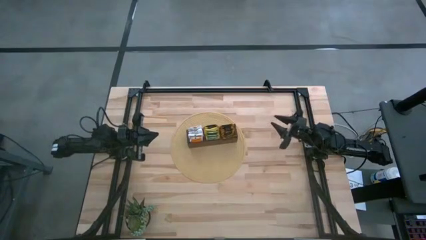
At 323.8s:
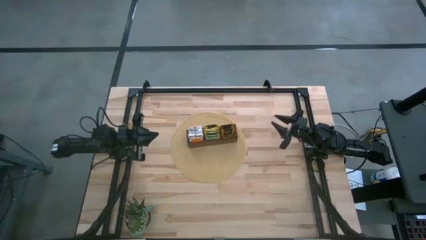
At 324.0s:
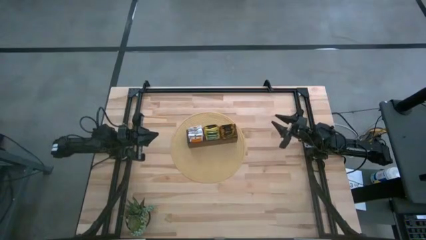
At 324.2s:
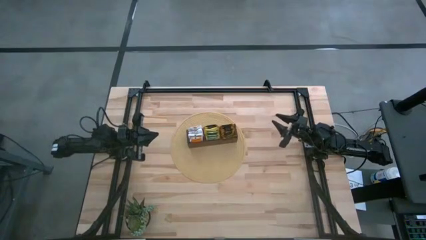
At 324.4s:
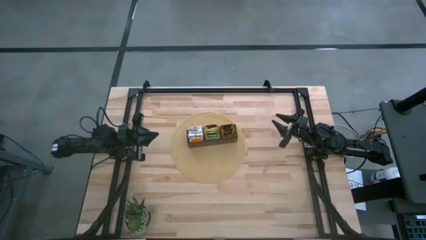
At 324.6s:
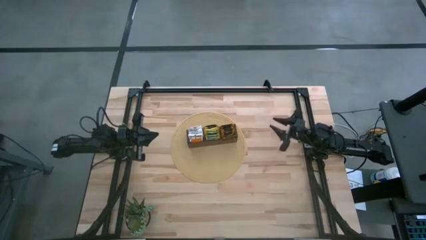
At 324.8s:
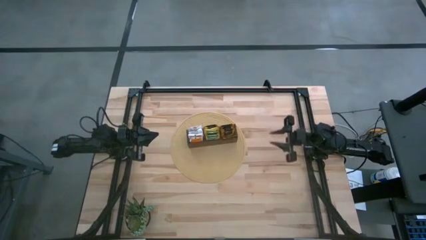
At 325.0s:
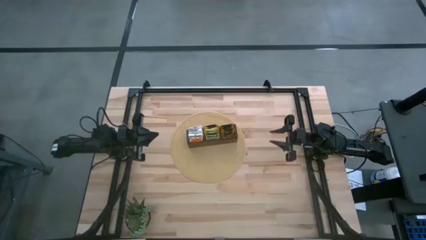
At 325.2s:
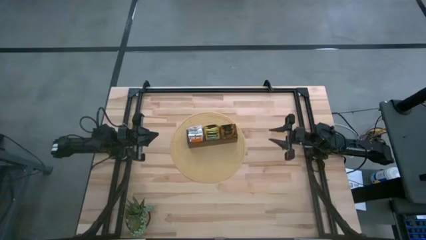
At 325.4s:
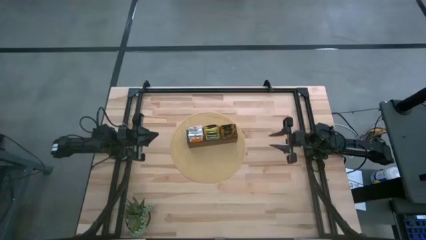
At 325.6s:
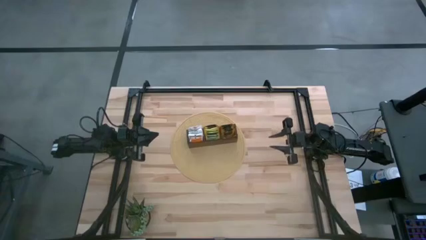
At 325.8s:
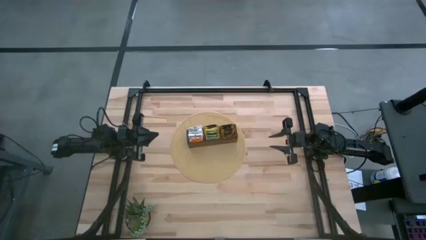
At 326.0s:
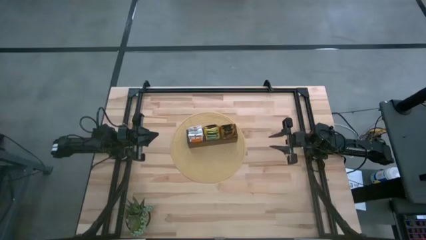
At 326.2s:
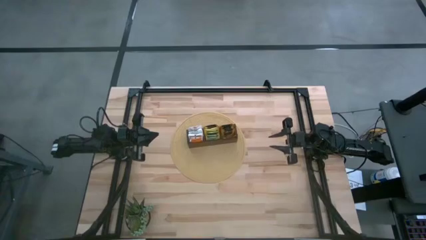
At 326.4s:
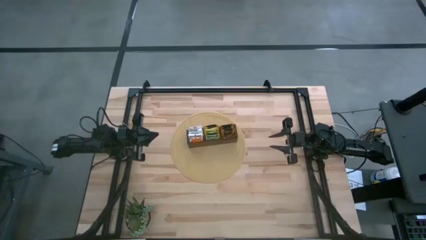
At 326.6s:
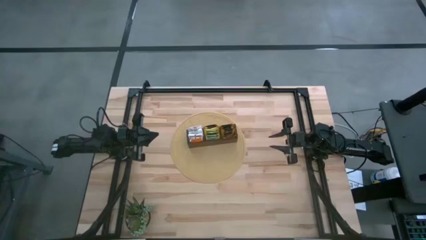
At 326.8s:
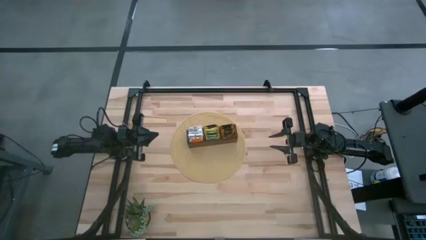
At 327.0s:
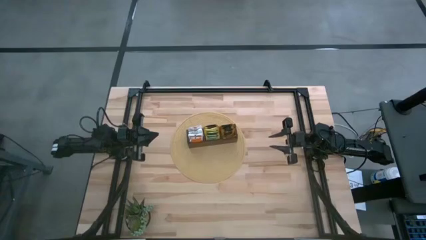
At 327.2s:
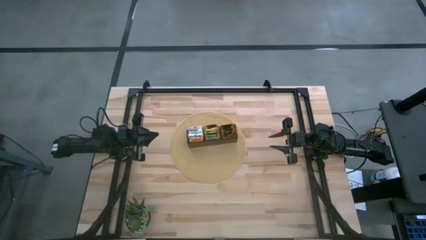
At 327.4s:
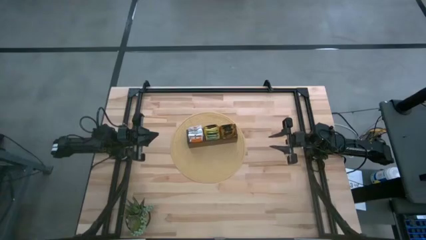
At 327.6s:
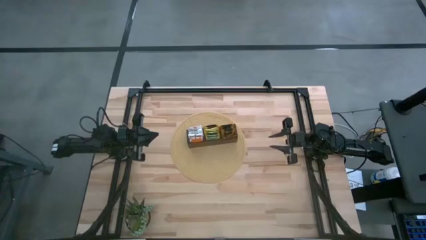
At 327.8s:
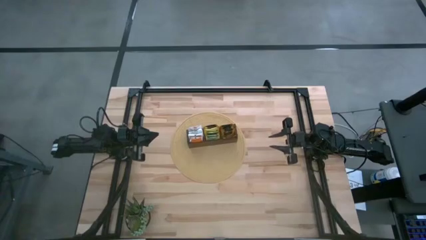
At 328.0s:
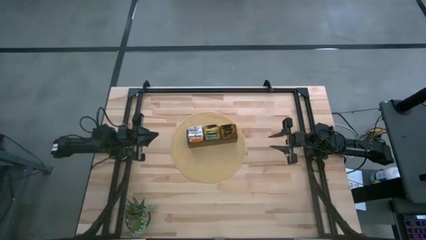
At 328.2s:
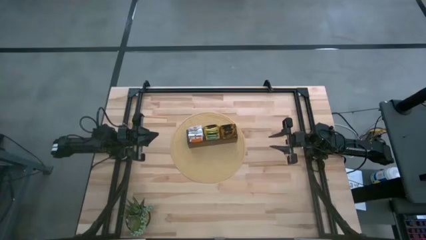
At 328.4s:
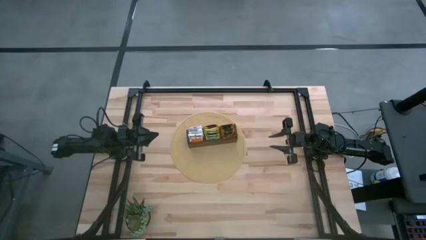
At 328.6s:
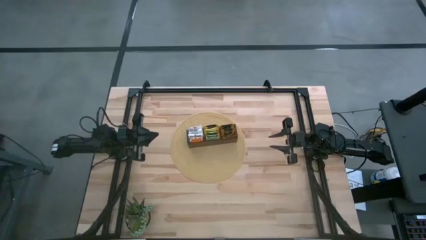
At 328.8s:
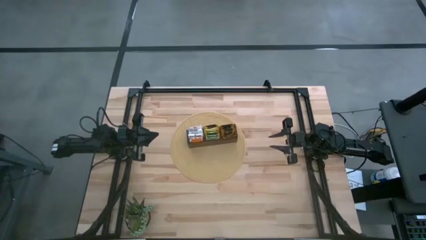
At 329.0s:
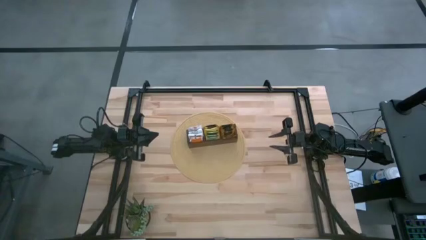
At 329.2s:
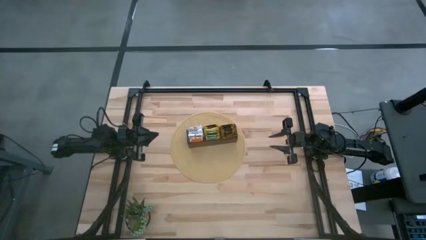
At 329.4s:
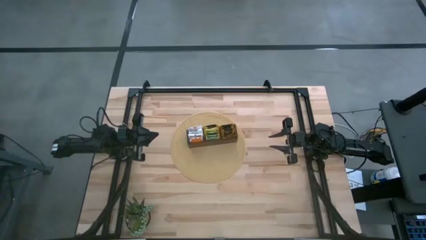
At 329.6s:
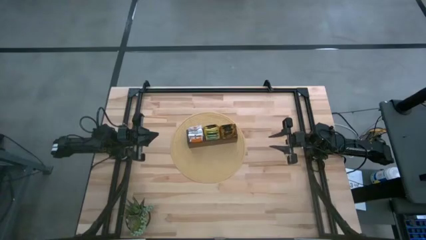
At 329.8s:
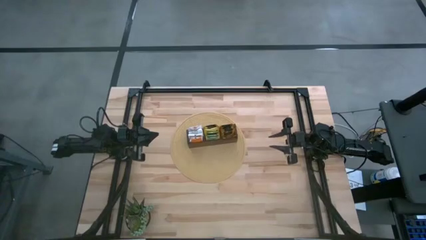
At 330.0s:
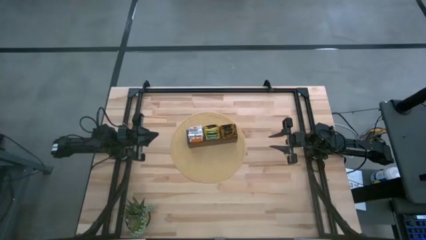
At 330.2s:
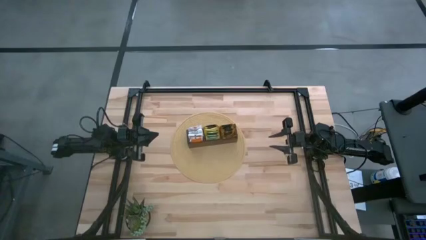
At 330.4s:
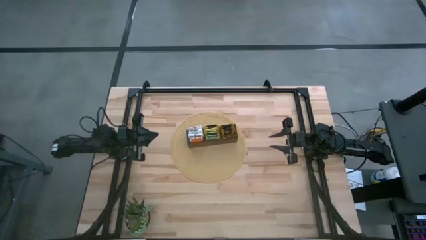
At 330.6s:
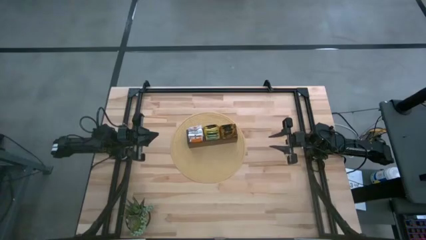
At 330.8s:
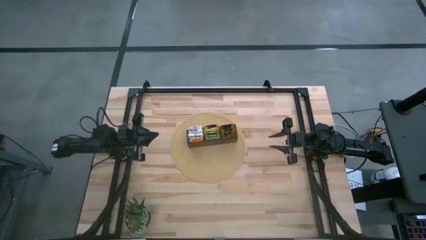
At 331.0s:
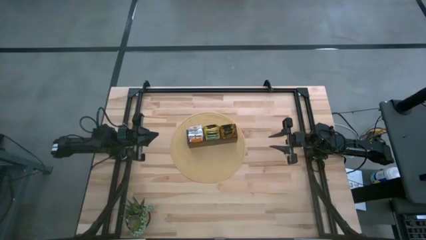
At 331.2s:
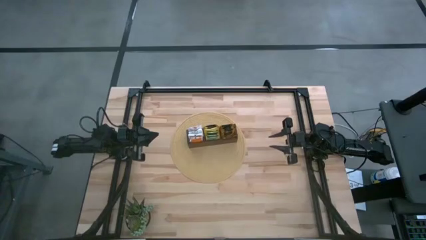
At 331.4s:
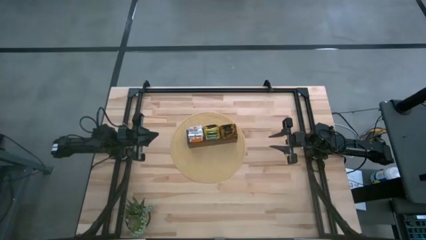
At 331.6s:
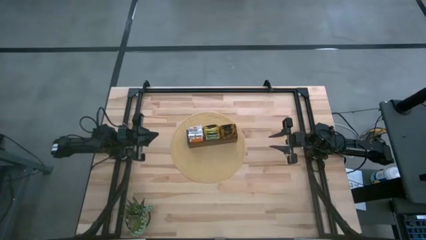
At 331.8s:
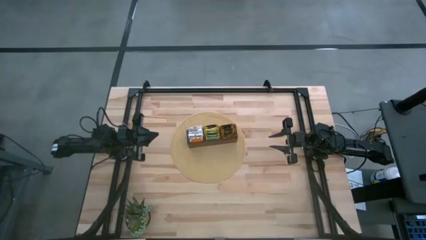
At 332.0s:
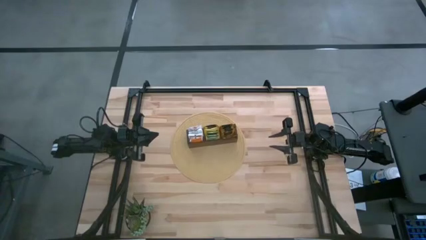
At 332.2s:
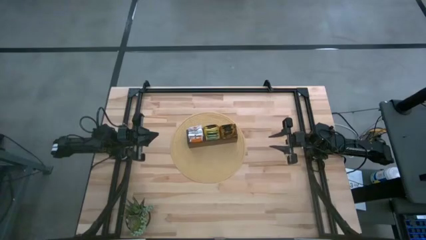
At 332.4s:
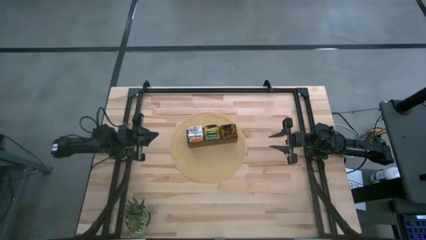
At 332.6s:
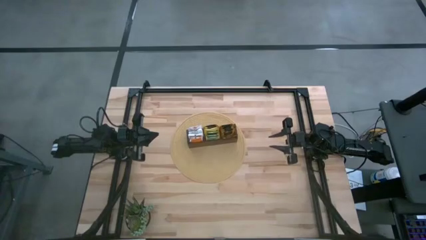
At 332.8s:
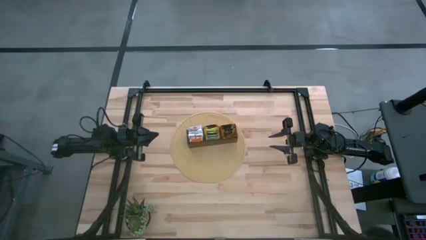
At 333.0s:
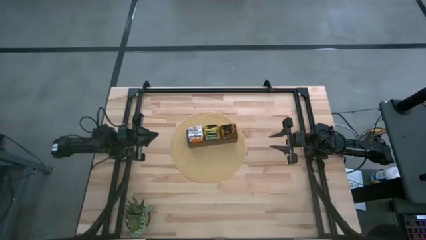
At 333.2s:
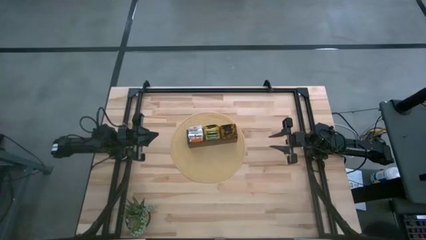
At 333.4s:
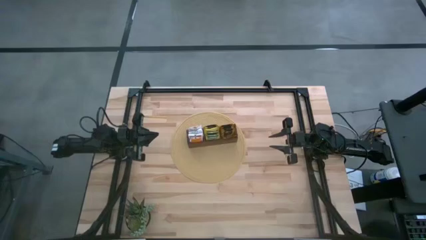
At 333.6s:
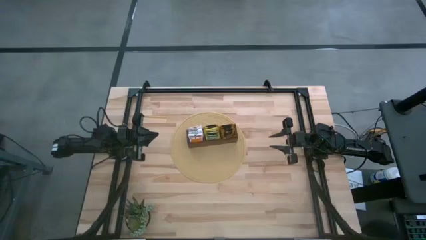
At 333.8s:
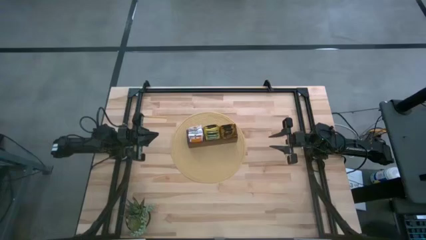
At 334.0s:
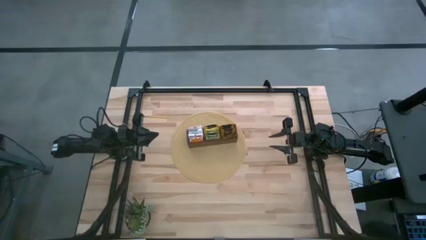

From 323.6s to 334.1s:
Task: Pick & Place Tea
Return to Home Position

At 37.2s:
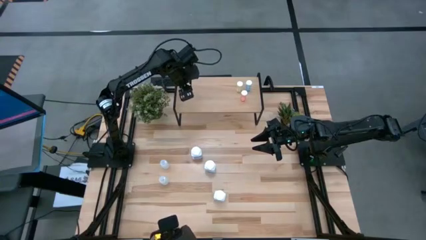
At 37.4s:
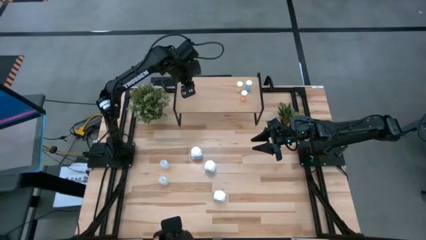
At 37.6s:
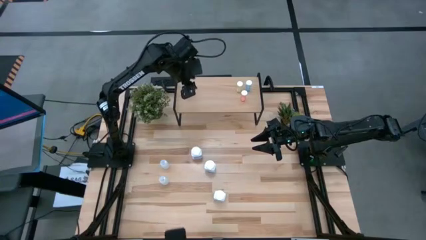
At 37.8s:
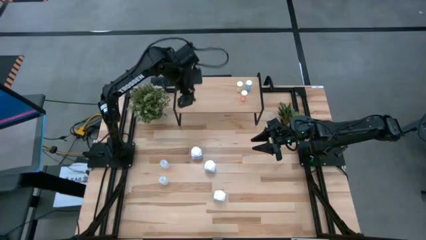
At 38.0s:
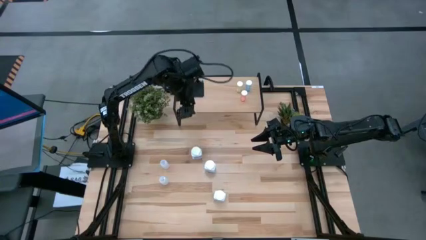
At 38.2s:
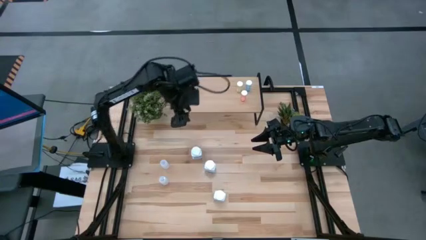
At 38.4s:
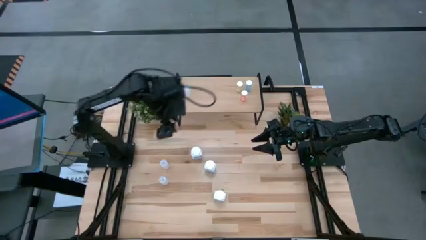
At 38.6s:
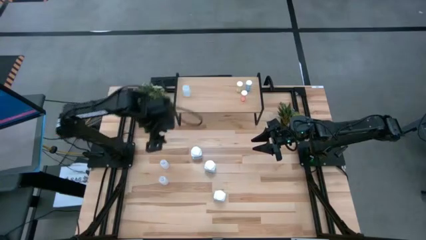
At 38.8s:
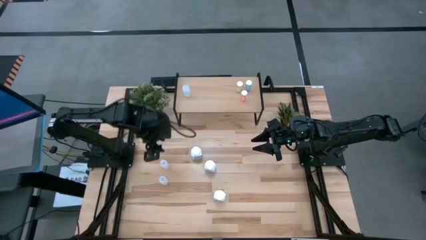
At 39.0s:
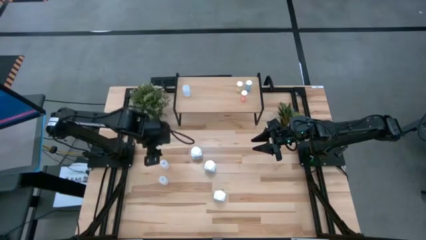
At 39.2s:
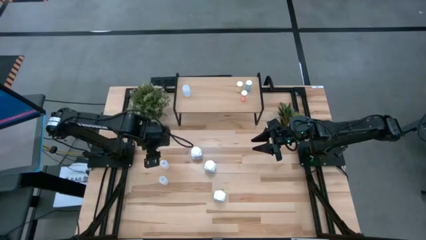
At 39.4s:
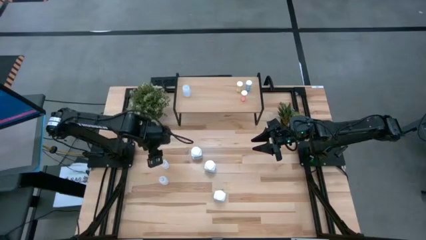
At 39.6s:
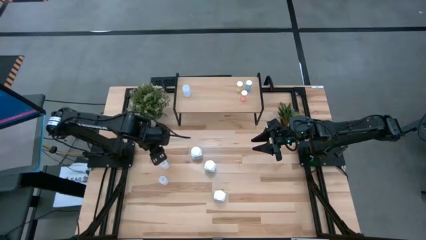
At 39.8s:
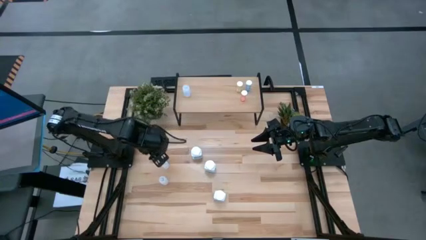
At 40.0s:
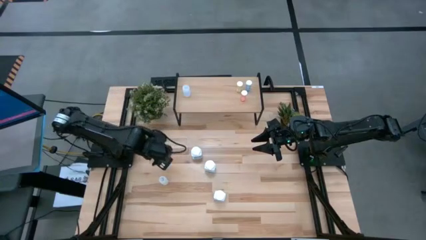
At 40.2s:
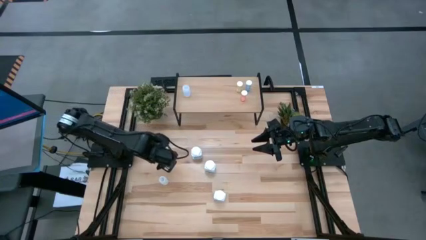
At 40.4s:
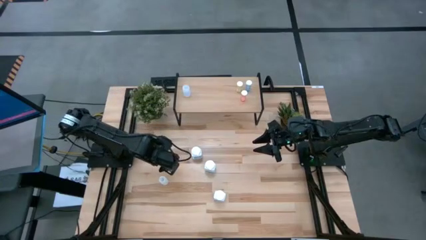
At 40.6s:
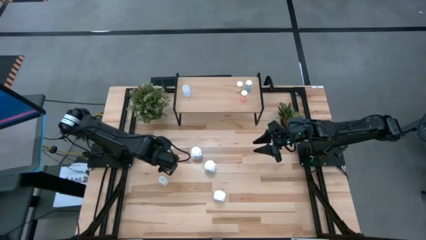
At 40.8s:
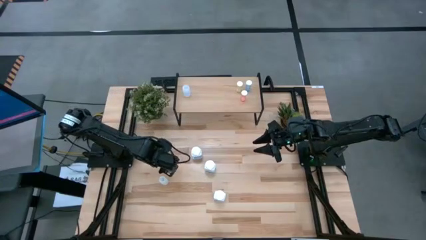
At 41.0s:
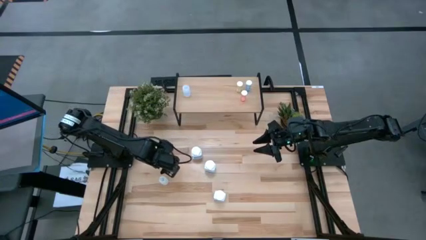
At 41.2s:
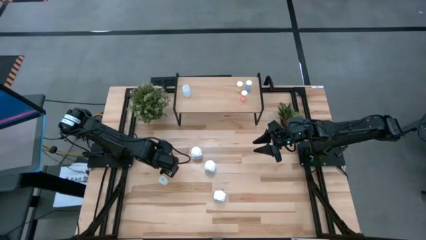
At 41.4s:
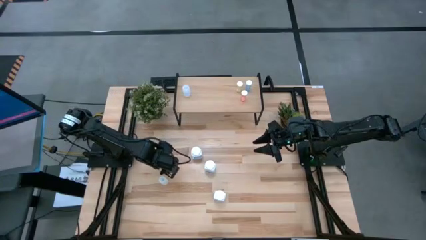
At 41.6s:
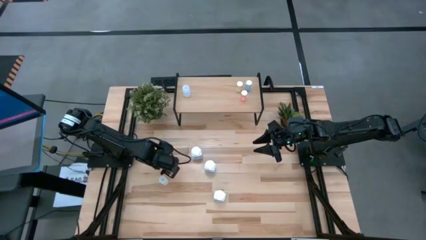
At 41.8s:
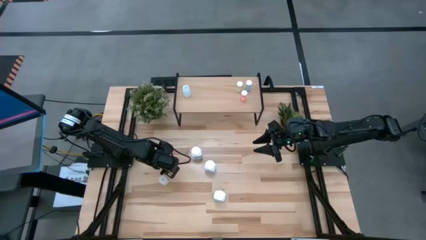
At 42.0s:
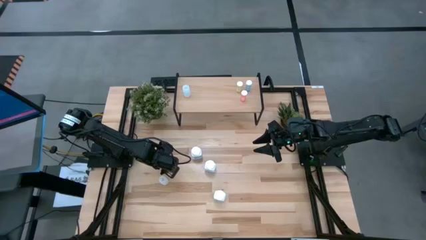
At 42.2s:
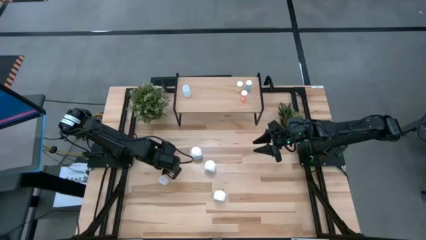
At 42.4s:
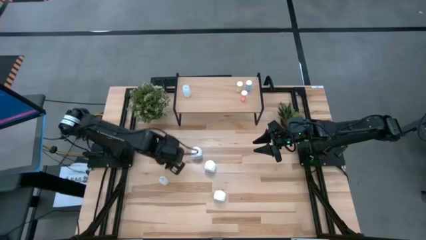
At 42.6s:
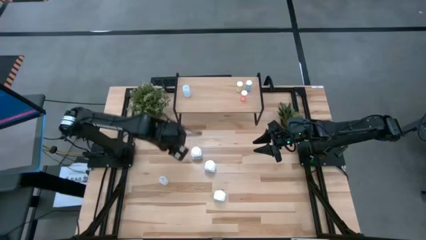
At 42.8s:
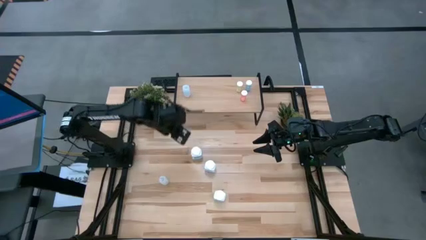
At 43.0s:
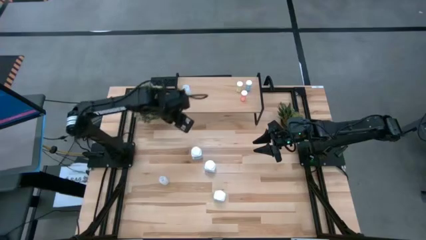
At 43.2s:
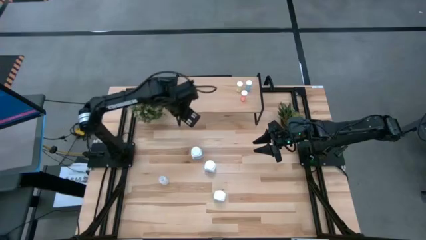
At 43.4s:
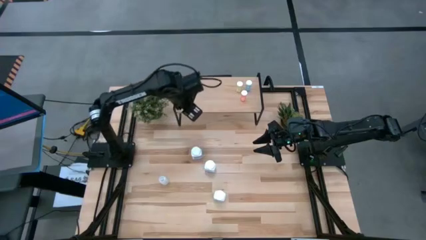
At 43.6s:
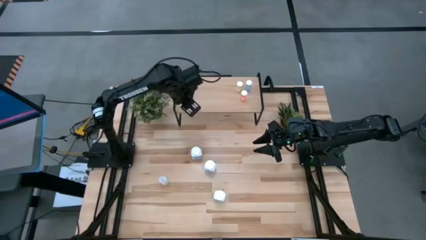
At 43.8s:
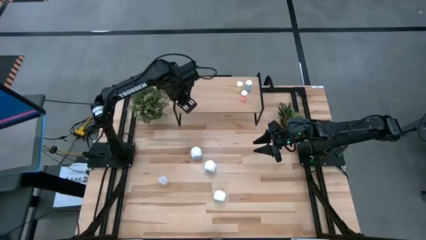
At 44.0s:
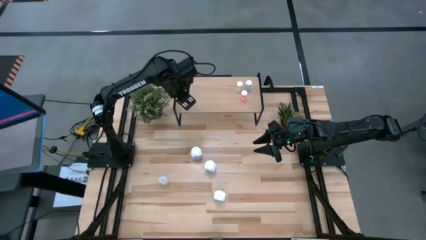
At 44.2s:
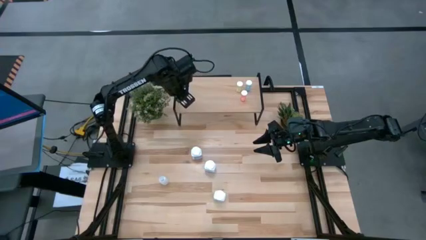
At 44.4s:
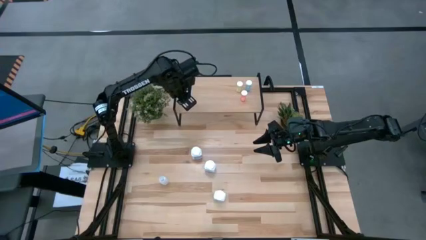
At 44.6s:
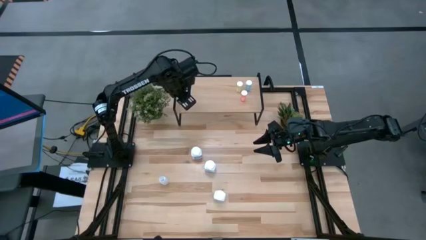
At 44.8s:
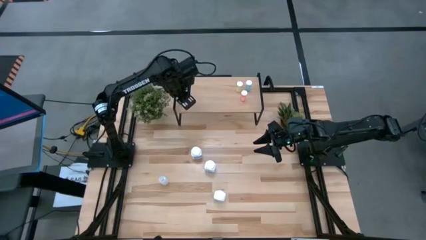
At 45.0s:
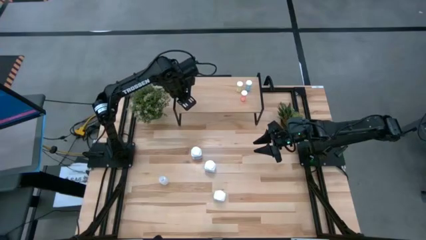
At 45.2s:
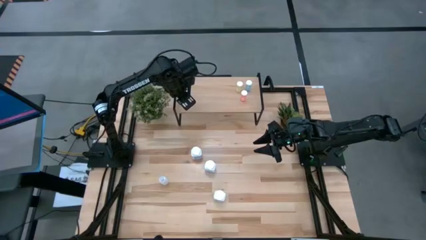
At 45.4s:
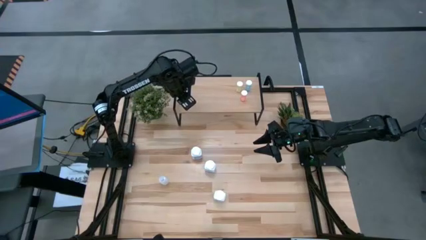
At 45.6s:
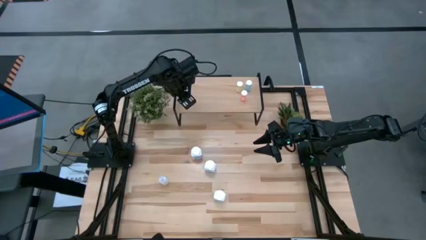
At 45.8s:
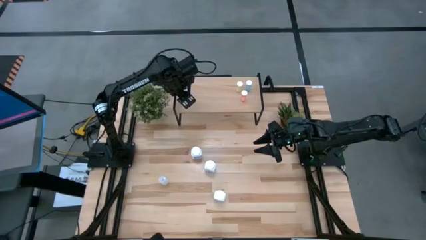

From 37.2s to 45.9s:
Task: Pick and place medicine bottles onto shelf by color
Put the white pill bottle on the shelf
